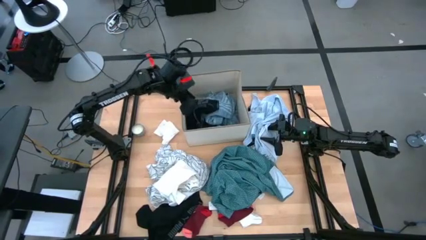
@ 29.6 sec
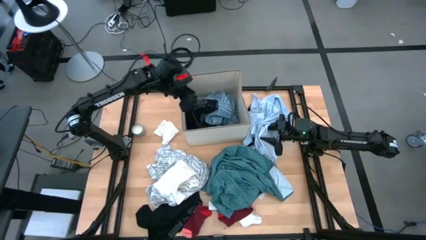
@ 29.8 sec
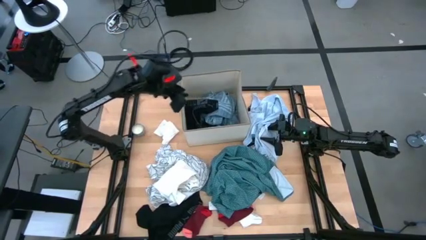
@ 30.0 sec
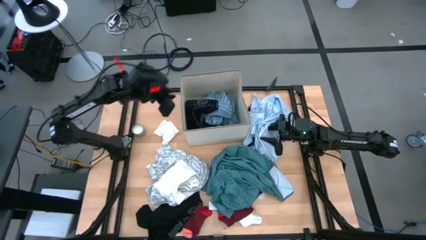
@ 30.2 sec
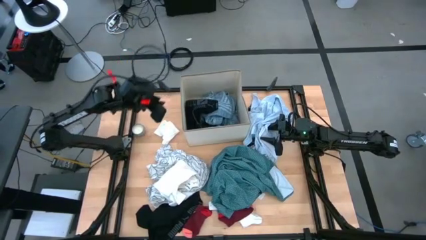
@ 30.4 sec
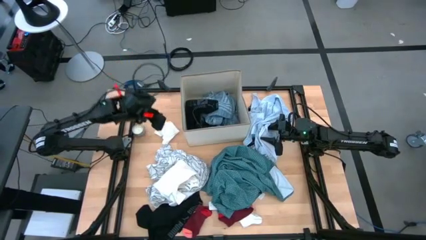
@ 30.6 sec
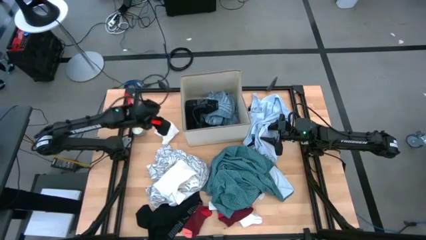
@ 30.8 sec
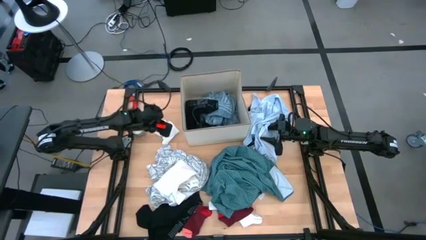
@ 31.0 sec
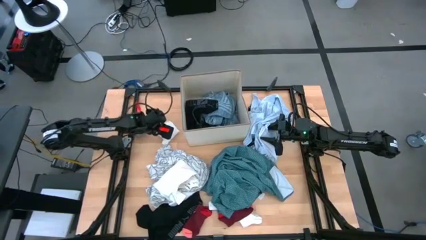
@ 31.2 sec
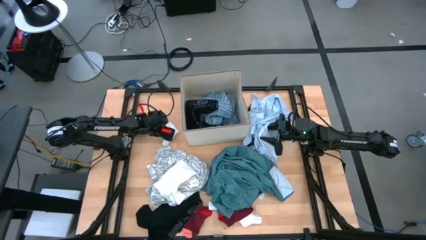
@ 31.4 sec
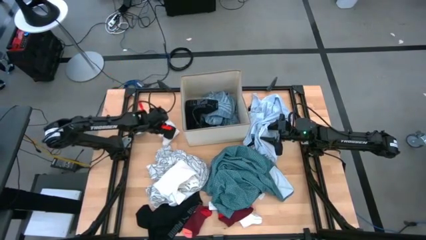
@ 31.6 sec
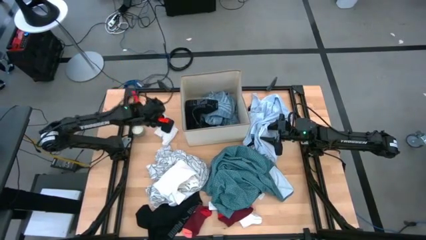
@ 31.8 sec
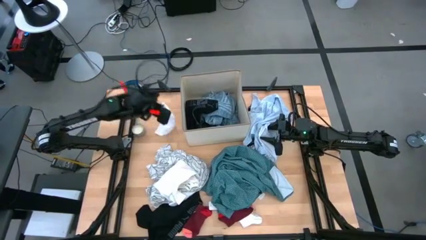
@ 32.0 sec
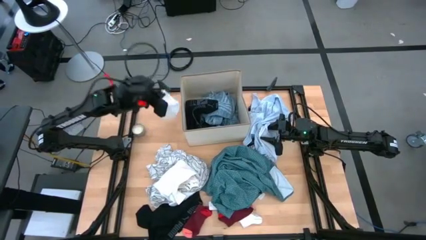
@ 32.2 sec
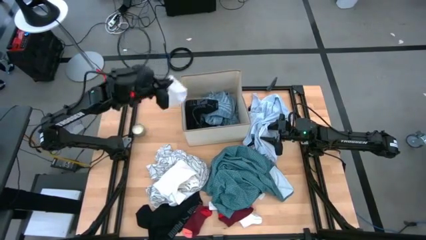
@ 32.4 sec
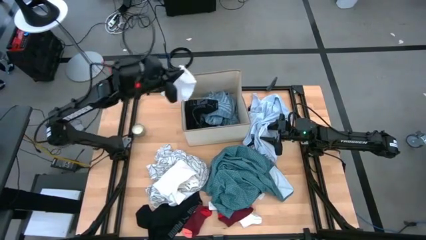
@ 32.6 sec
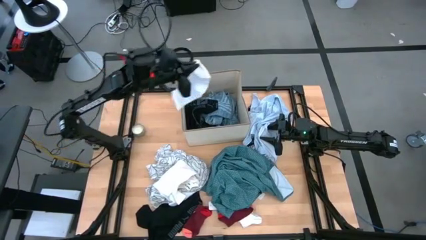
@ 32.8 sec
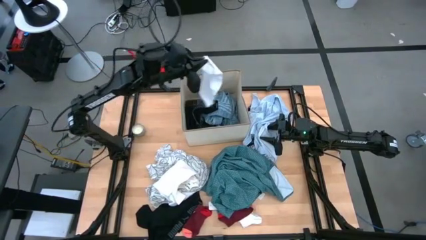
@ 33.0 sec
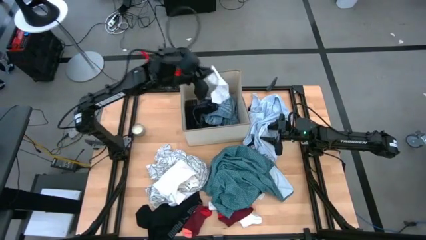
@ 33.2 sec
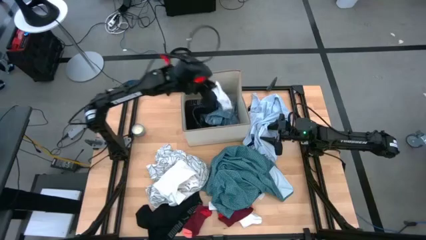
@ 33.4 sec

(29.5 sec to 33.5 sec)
Task: Sort clothes
Put the top white sock into the laundry organizer

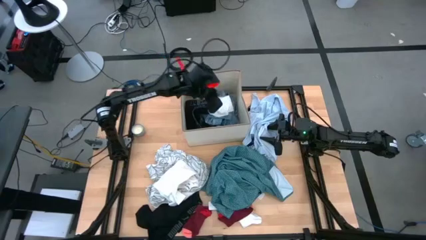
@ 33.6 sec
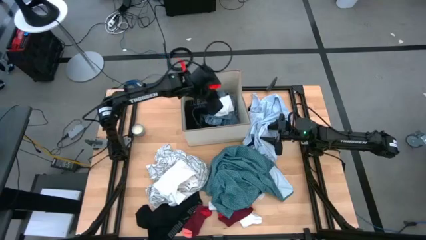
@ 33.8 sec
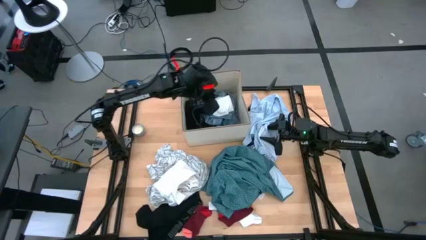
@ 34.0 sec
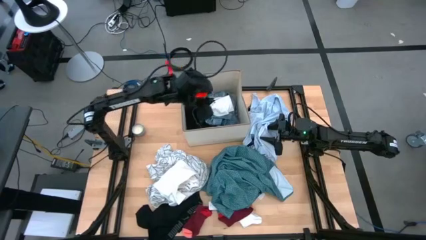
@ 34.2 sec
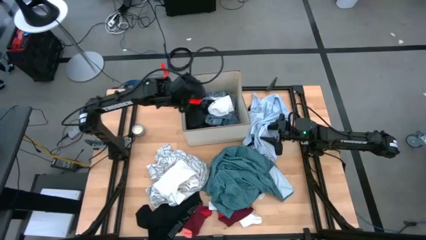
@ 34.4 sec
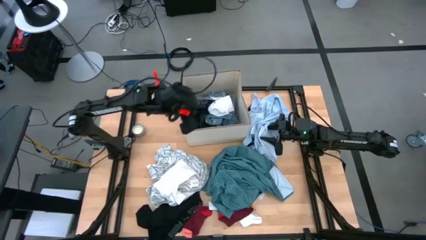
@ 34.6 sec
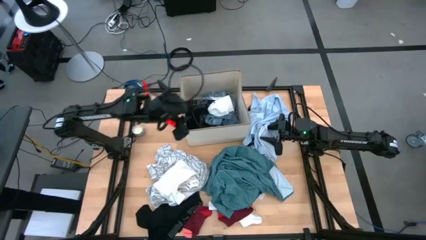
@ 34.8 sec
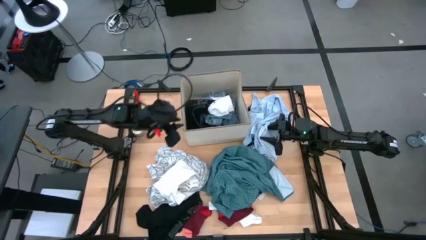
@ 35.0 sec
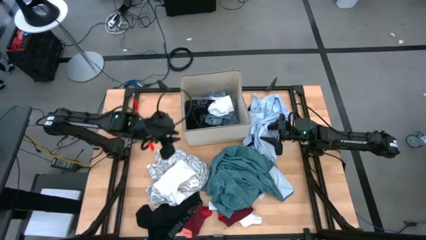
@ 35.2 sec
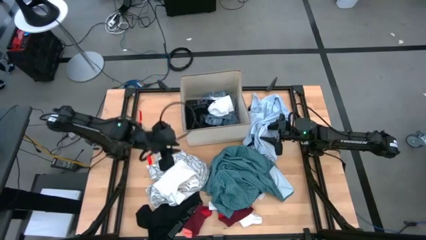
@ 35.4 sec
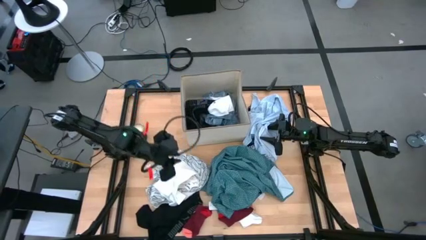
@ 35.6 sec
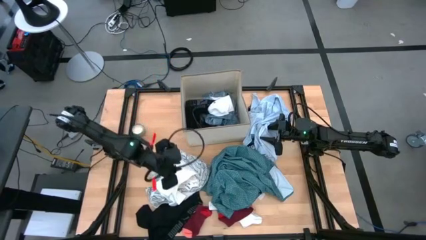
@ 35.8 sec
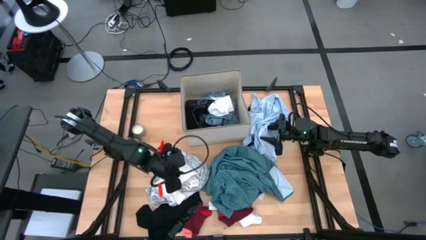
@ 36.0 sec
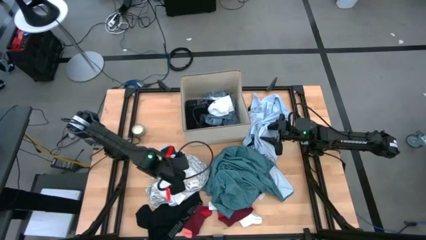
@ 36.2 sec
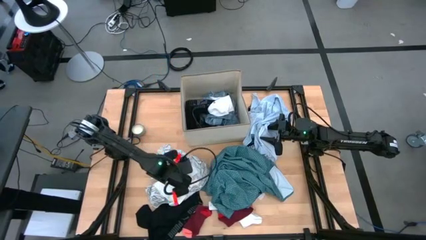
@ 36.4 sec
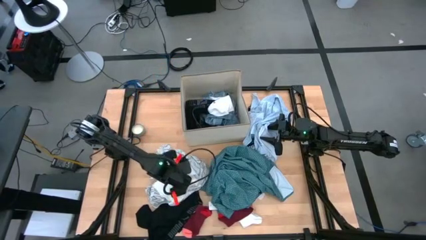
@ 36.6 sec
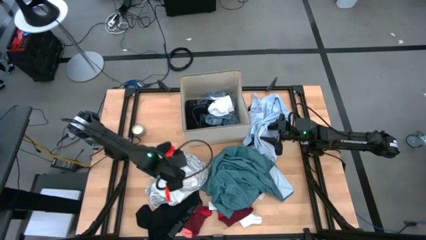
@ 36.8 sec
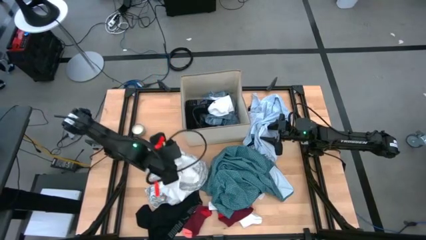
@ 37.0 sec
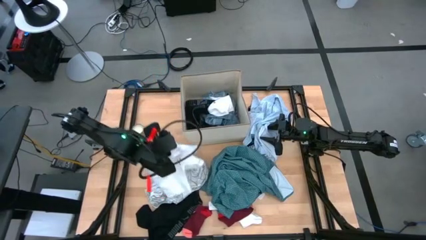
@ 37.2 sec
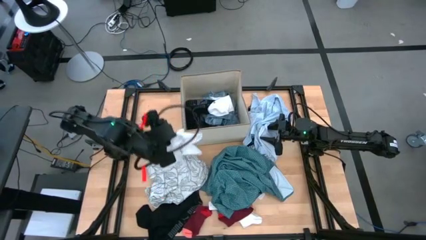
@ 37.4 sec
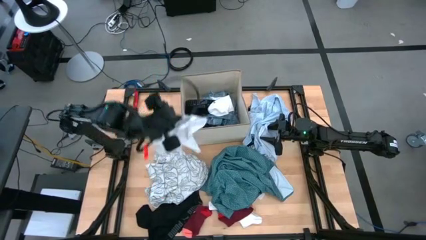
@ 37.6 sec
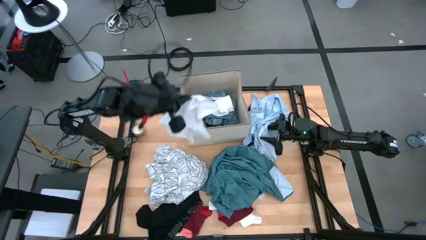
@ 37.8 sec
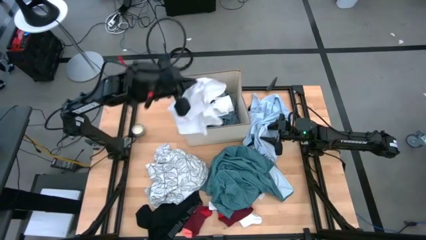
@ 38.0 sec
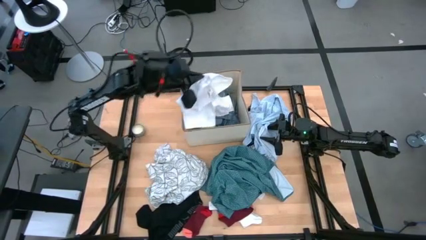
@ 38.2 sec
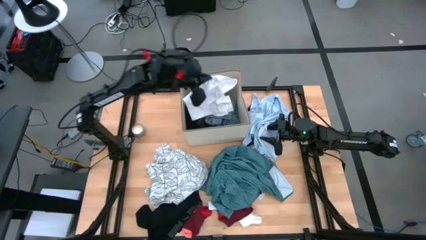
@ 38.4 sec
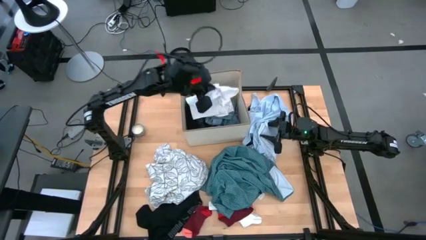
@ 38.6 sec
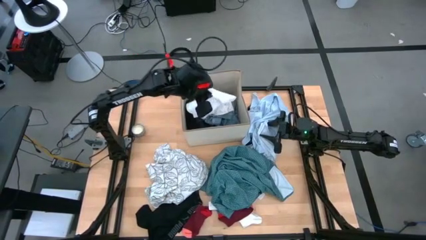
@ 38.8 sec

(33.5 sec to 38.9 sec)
Put the white shorts into the laundry organizer

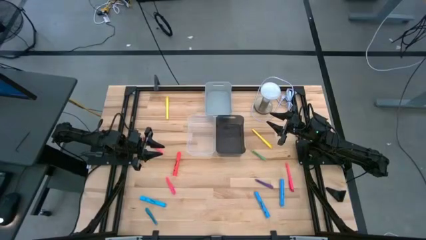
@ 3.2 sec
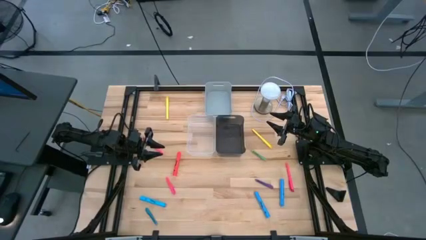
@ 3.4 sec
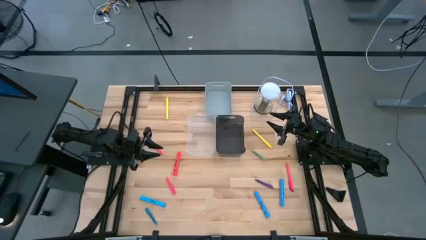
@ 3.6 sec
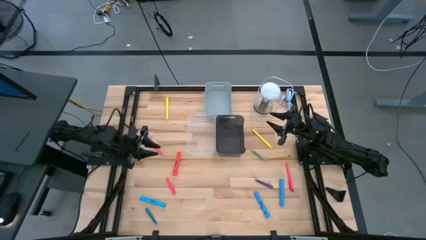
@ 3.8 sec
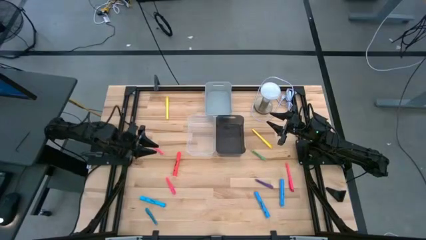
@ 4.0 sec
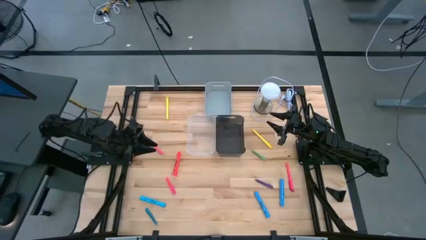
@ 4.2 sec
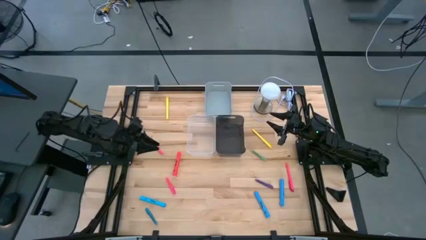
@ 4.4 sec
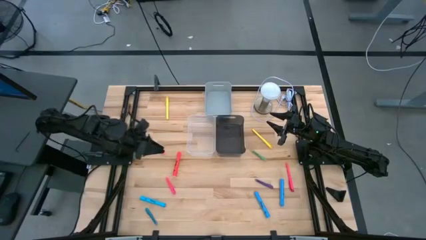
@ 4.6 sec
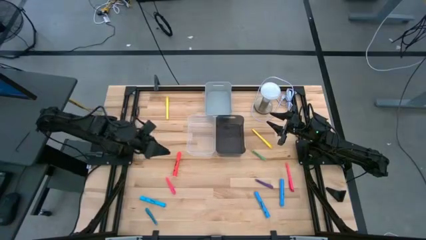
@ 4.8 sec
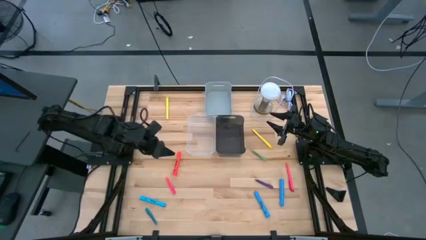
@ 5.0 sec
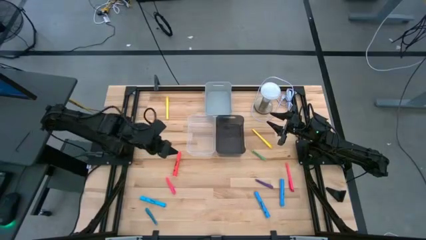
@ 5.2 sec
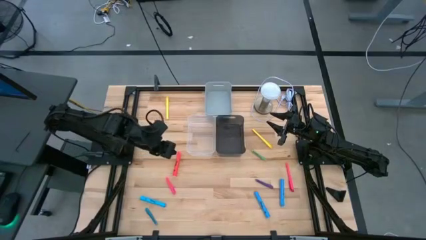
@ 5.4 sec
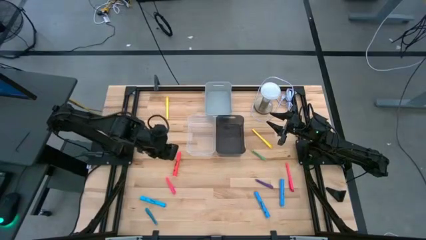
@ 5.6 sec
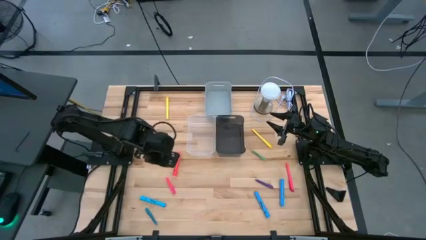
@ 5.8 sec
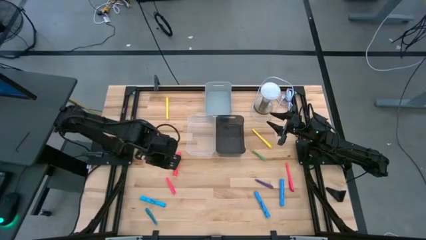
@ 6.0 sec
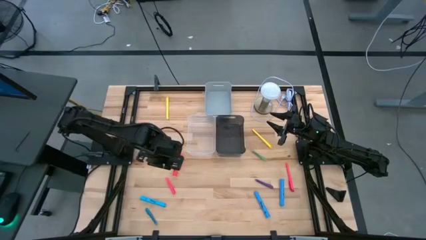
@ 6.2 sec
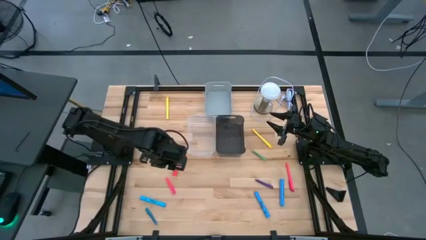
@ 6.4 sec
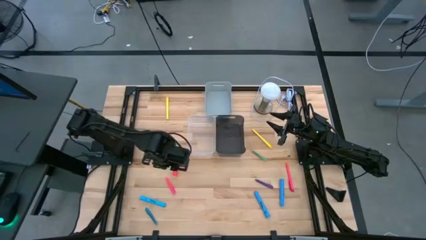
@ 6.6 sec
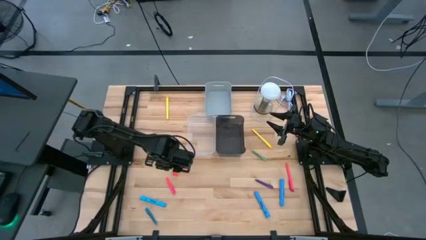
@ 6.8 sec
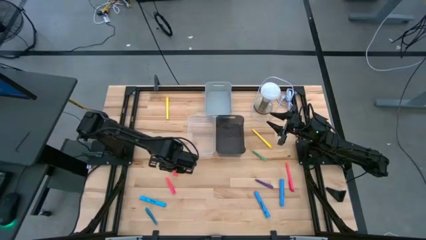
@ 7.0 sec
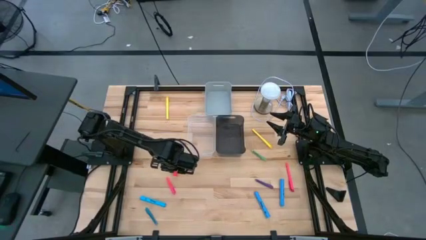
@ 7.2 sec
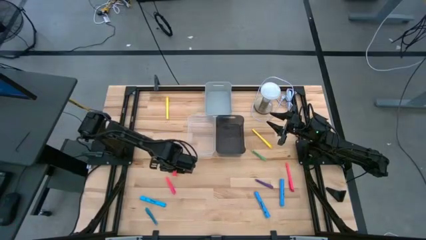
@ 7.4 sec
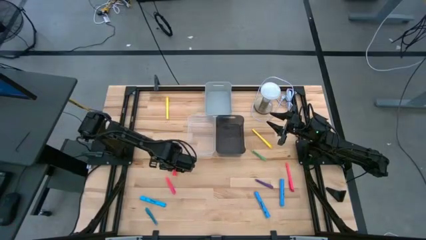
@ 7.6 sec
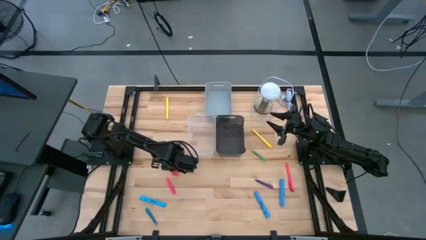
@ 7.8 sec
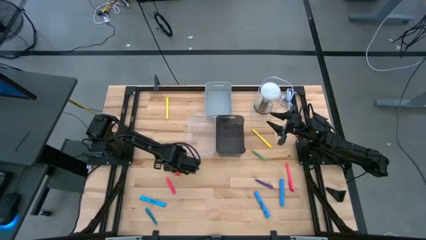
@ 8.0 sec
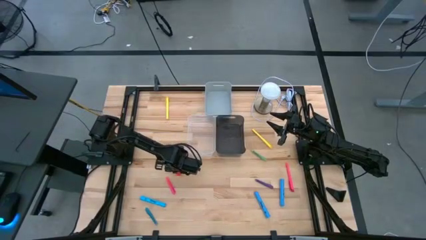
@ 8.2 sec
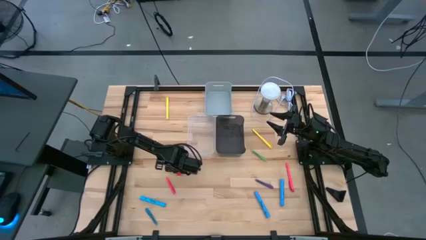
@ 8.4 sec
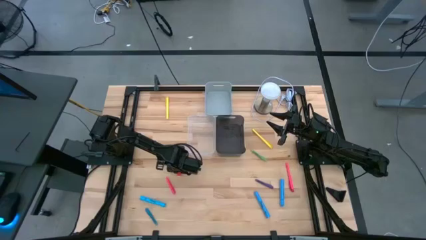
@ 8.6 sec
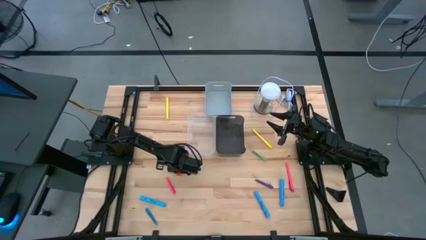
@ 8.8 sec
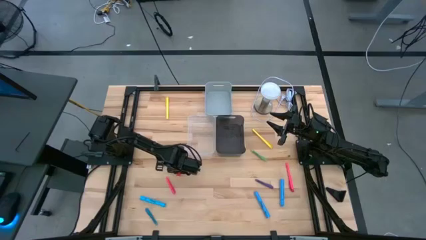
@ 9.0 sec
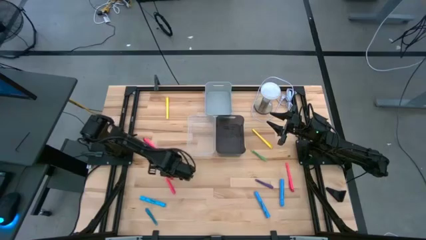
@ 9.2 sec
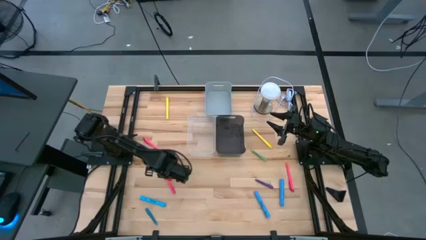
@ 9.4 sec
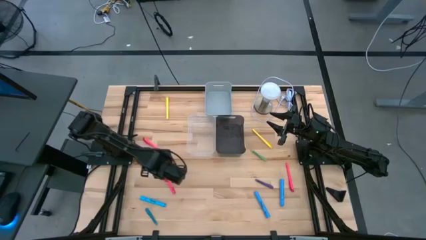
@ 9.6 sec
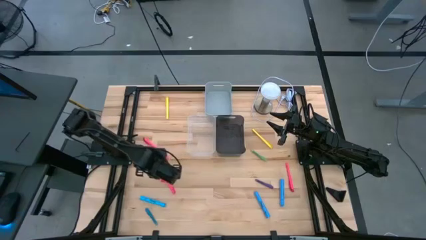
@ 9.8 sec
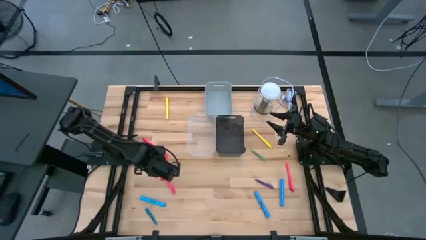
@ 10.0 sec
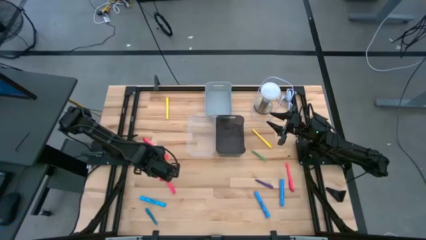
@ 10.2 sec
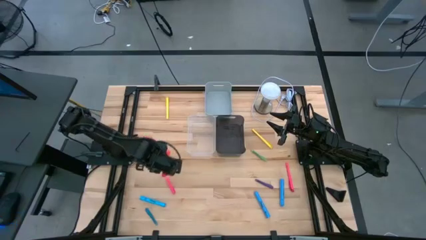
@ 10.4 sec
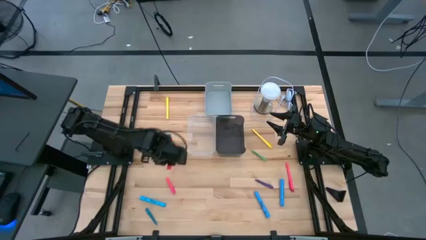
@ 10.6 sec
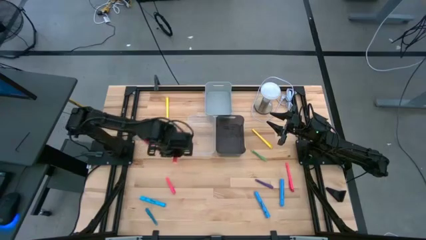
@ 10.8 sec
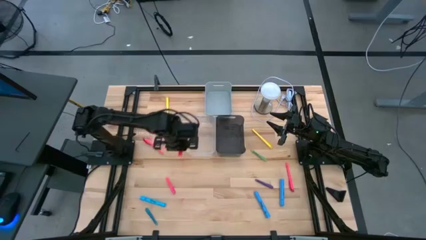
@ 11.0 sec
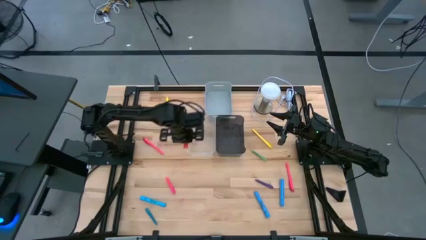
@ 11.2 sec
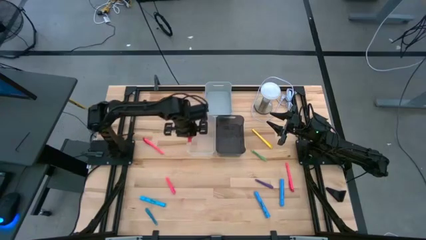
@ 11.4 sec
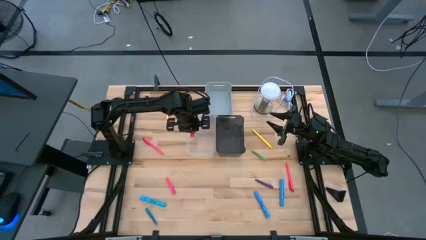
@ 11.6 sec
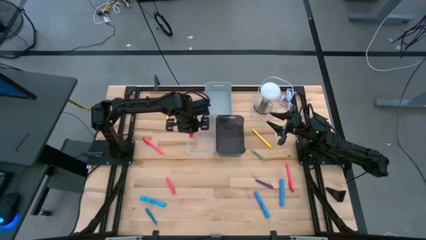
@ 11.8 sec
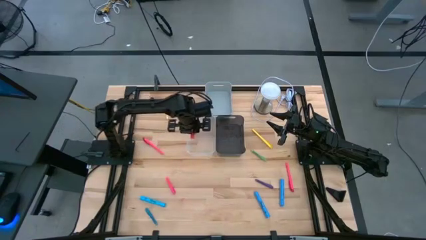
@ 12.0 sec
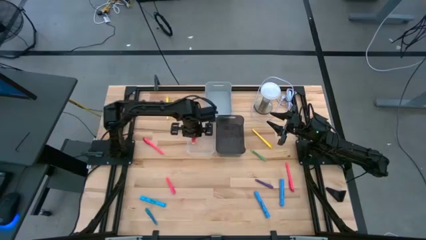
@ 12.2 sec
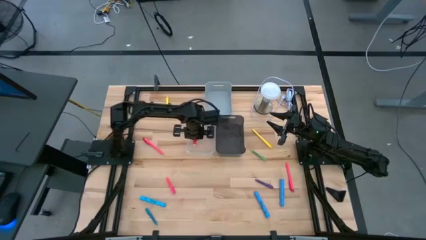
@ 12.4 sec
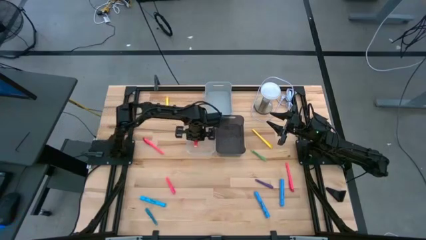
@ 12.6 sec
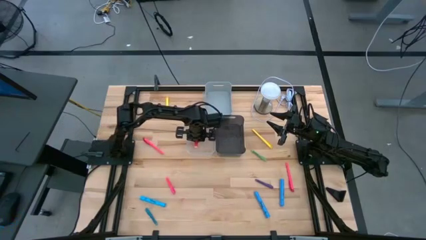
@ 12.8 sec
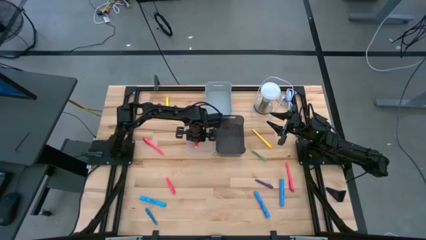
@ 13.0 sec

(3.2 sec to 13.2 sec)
Task: Pick & Place Markers
Put the red highlighter into the transparent bin
